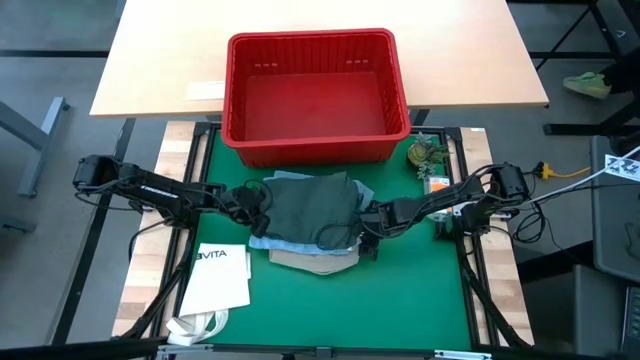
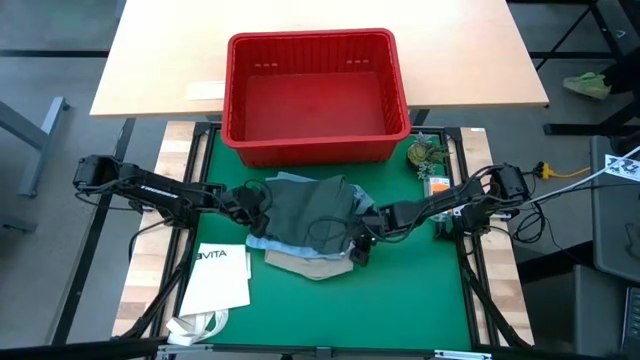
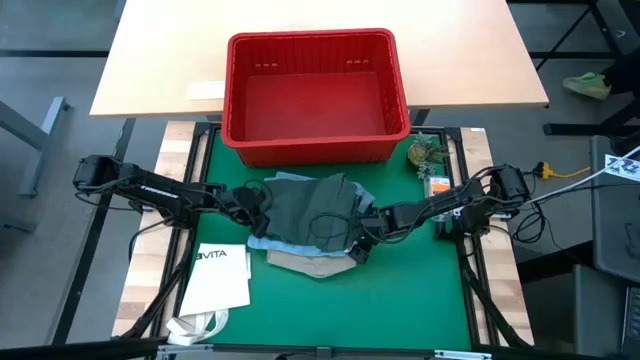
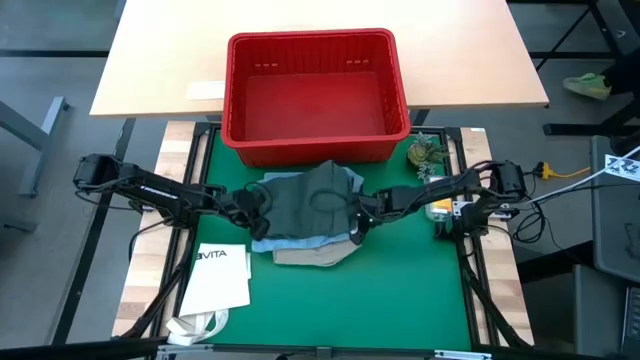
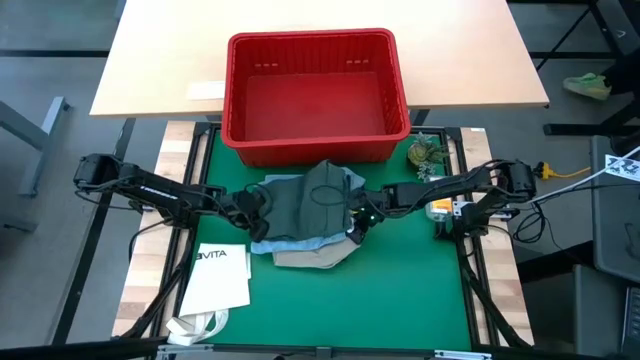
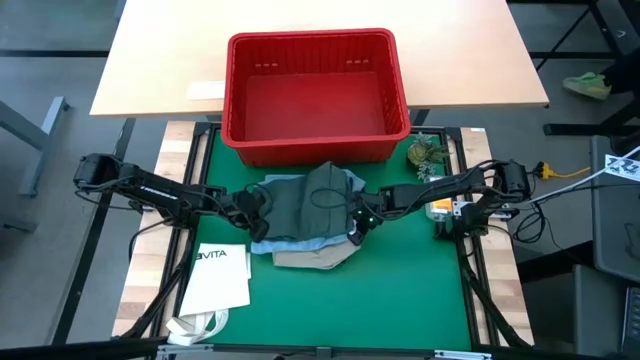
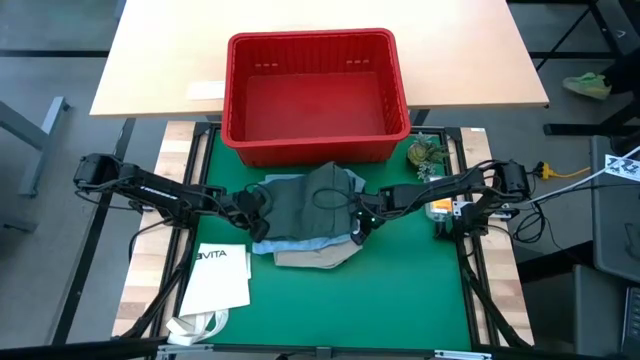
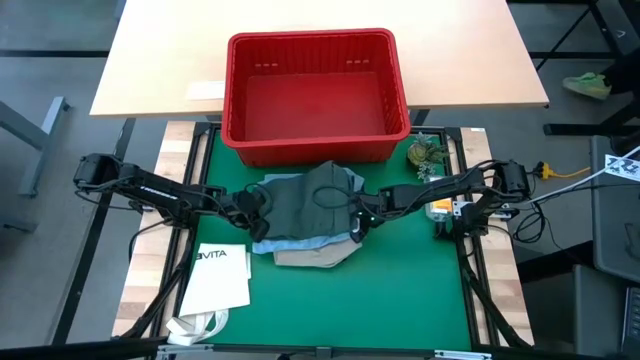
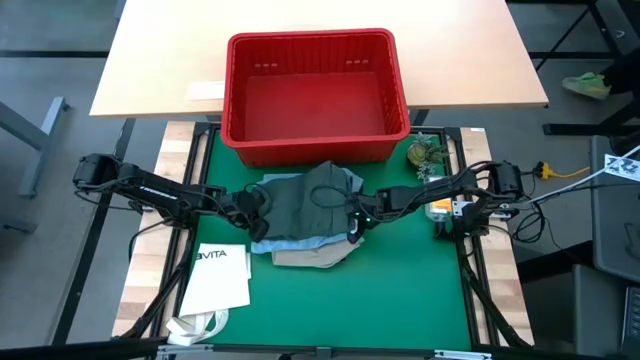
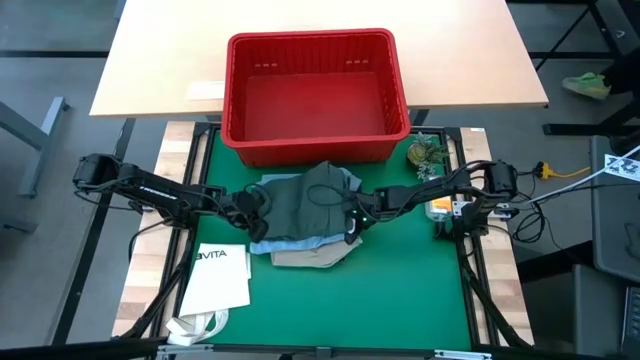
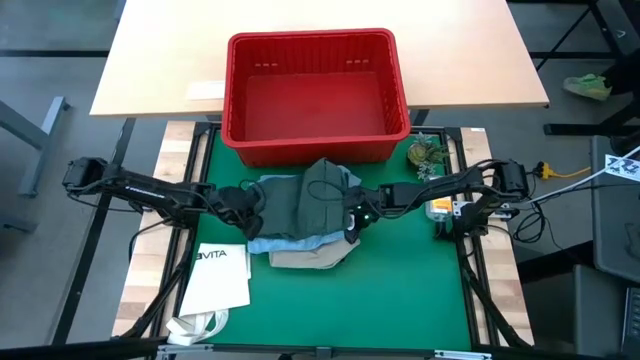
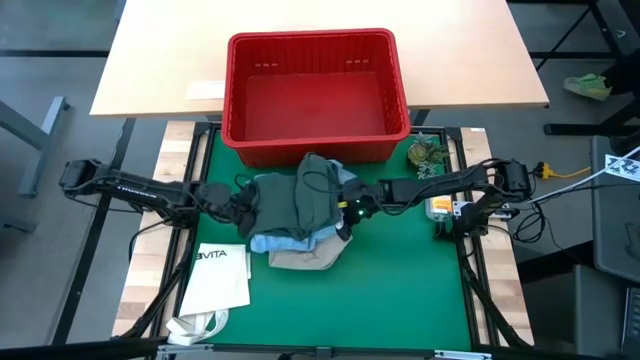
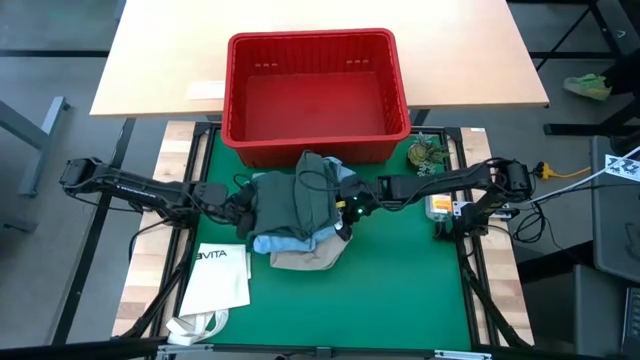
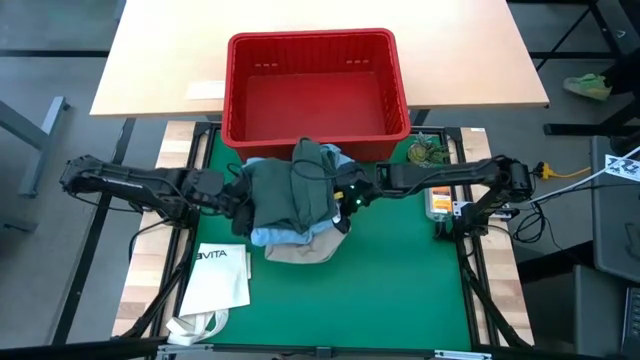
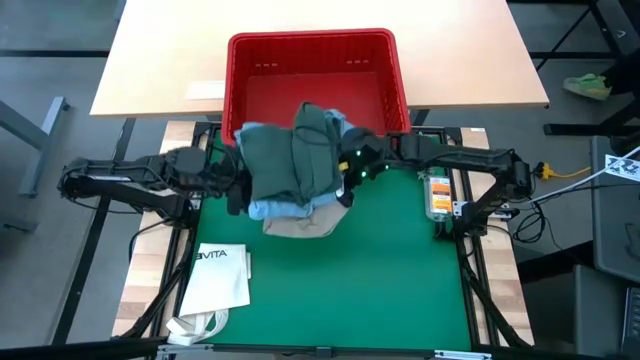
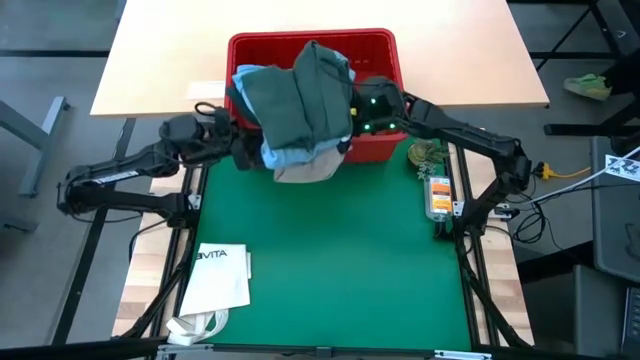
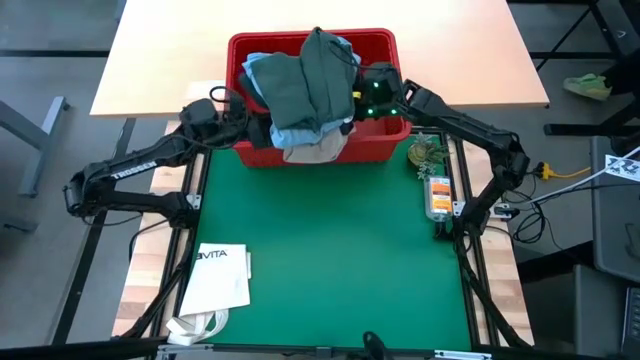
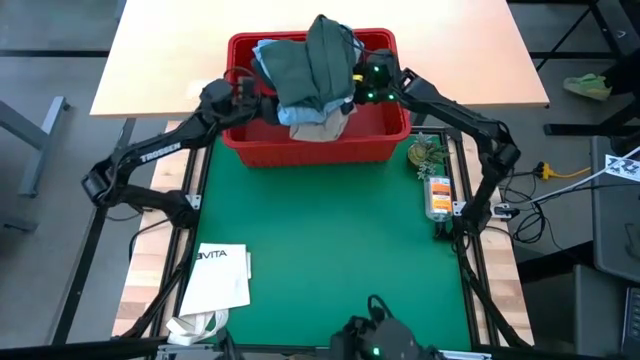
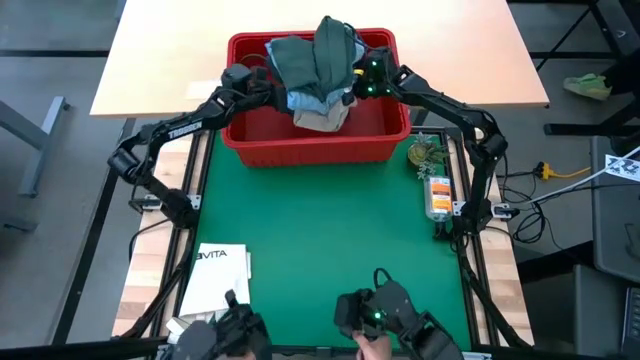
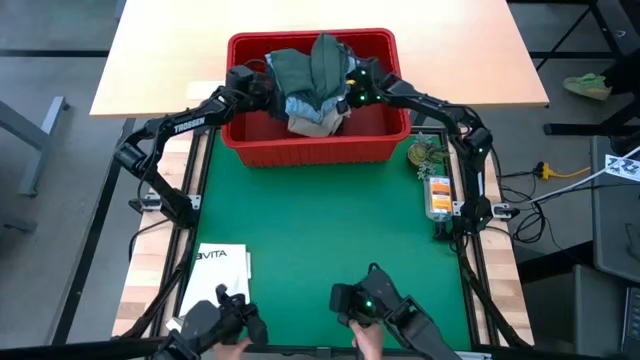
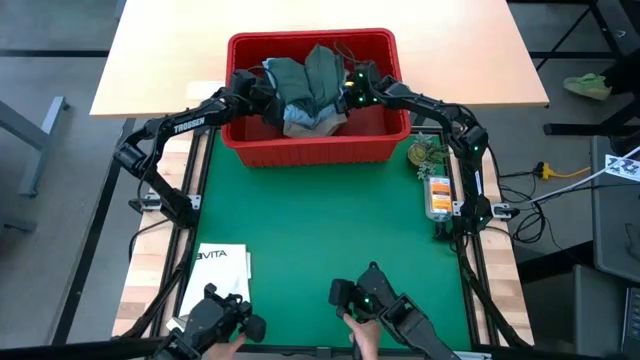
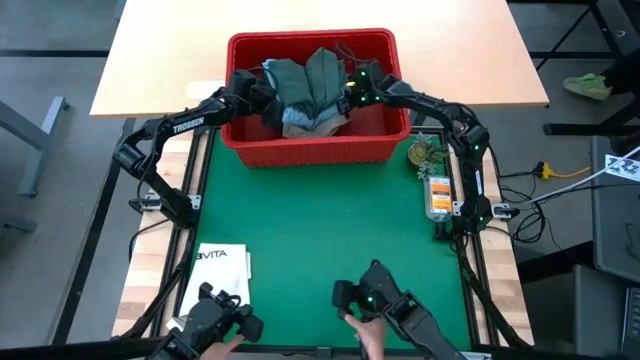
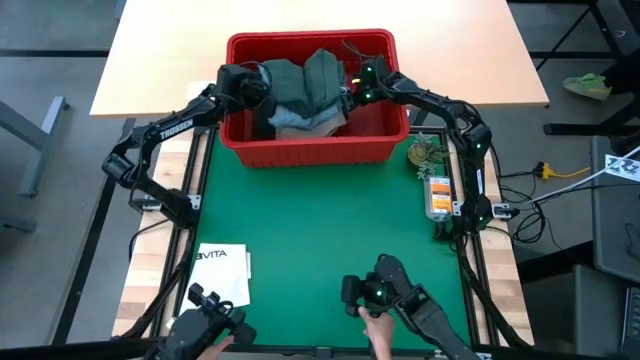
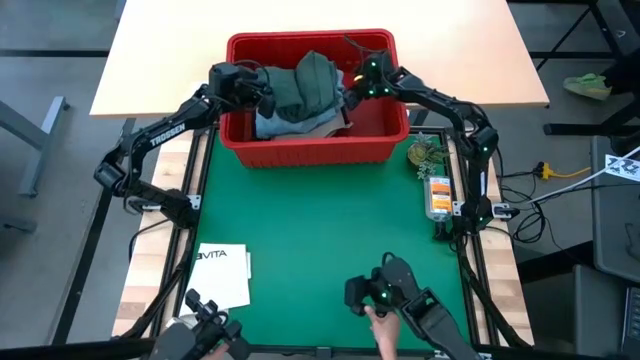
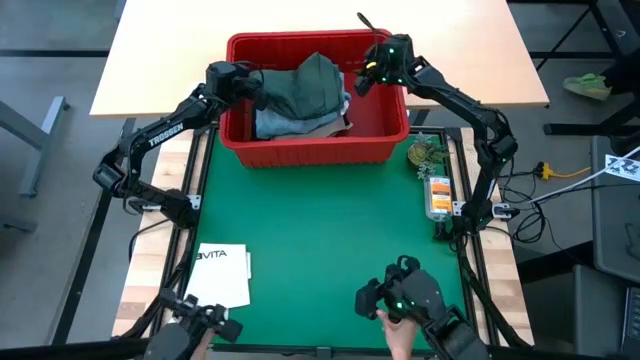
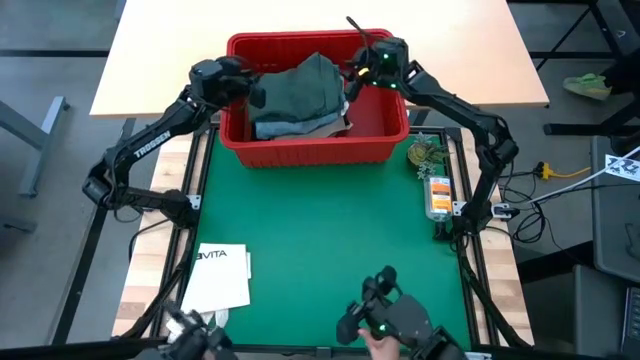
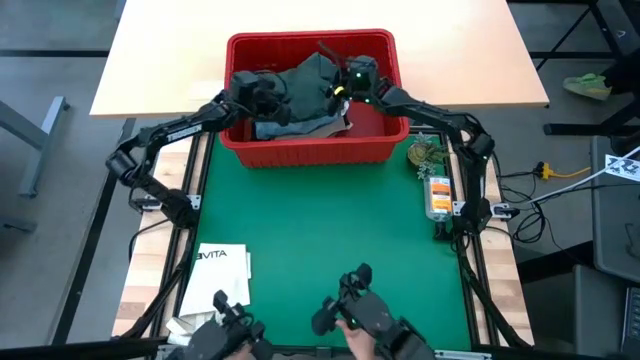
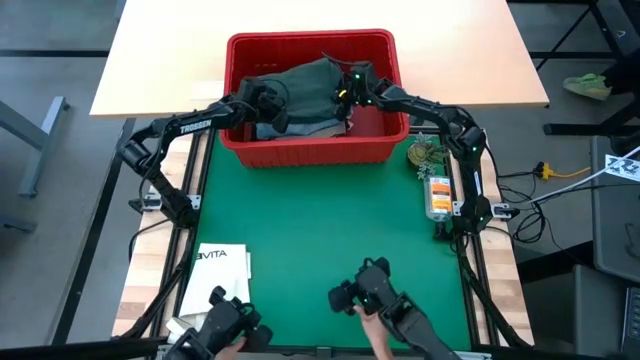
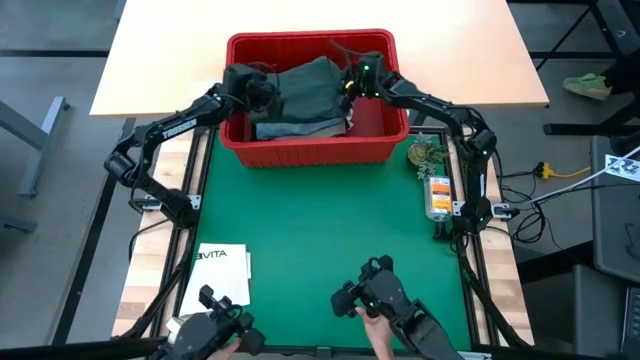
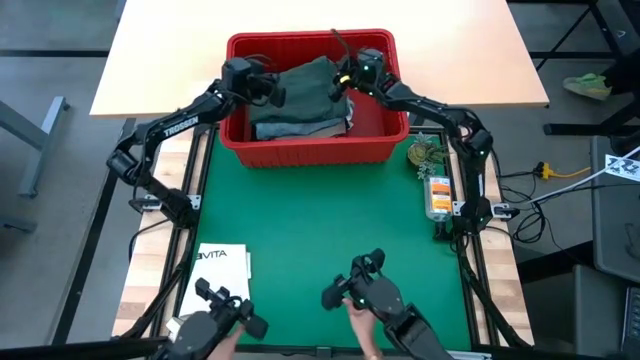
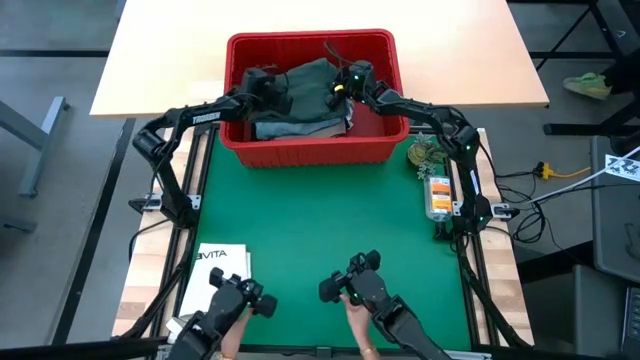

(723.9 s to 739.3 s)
Task: Fold Laundry from Bin
Put the stack of folded clothes into the red bin

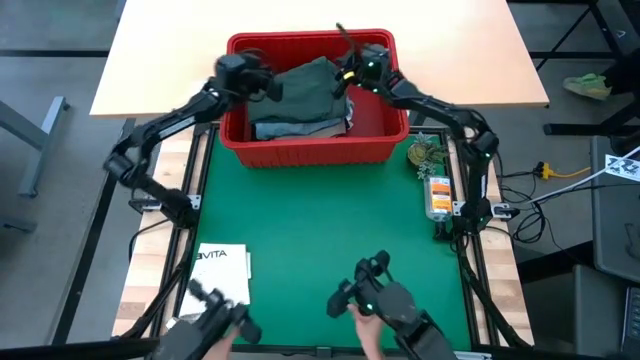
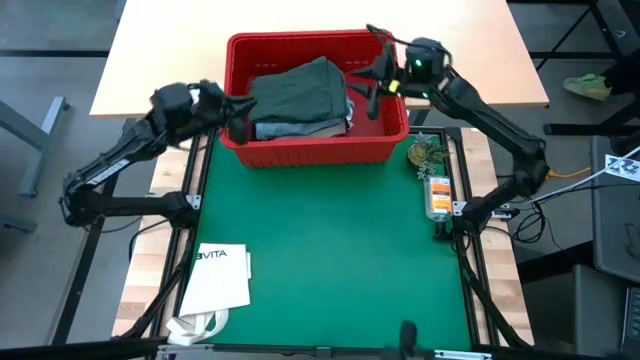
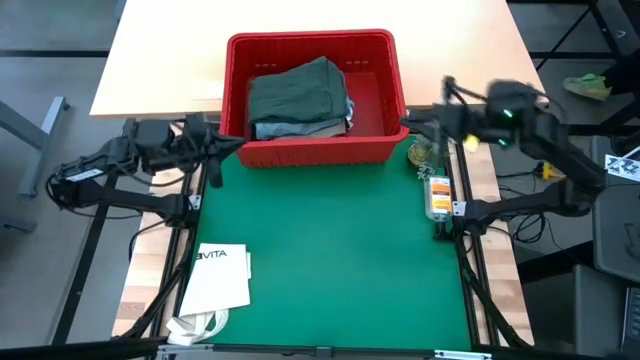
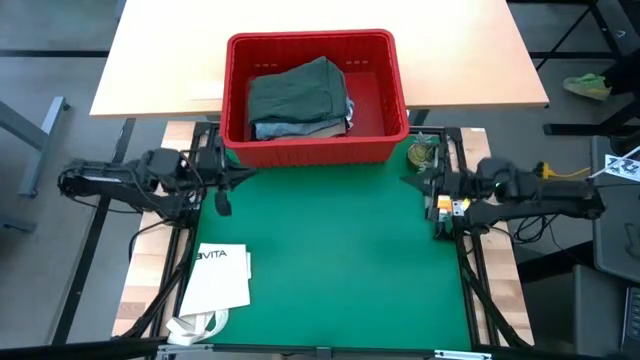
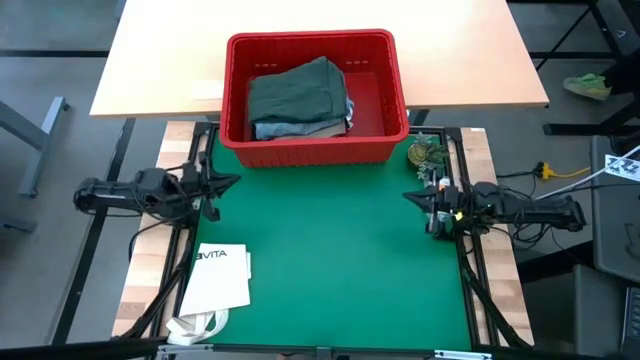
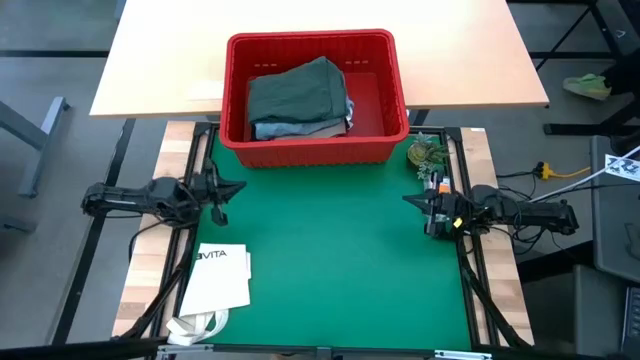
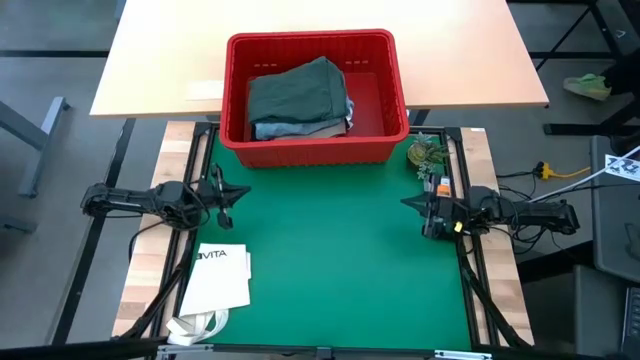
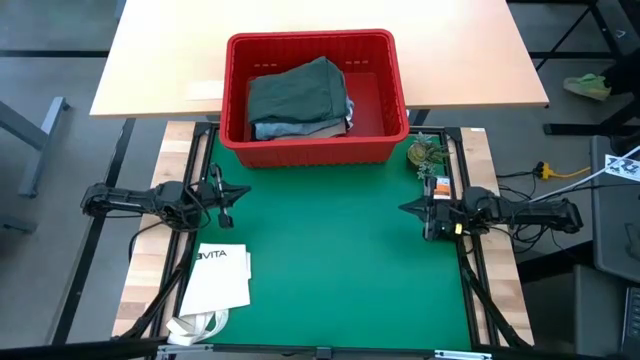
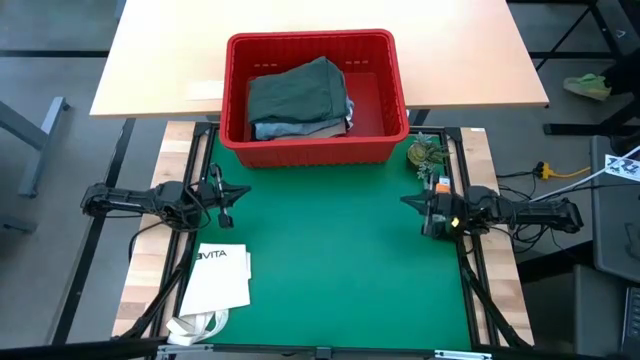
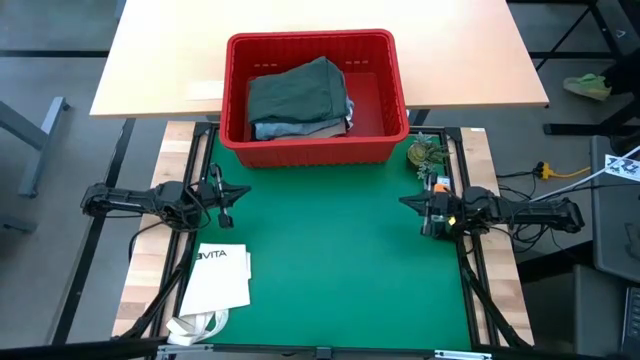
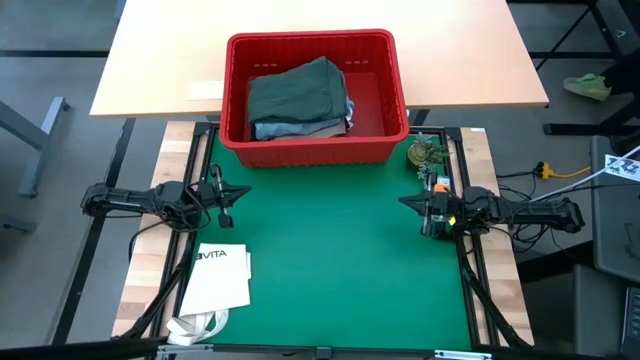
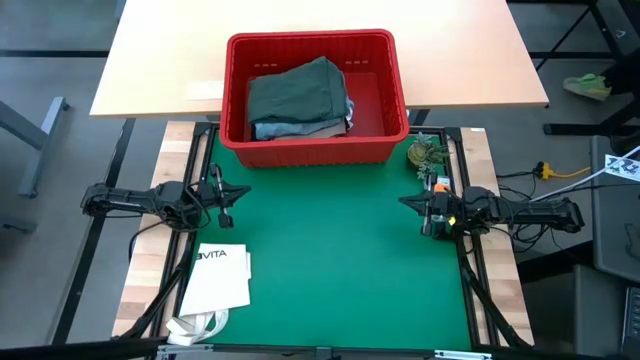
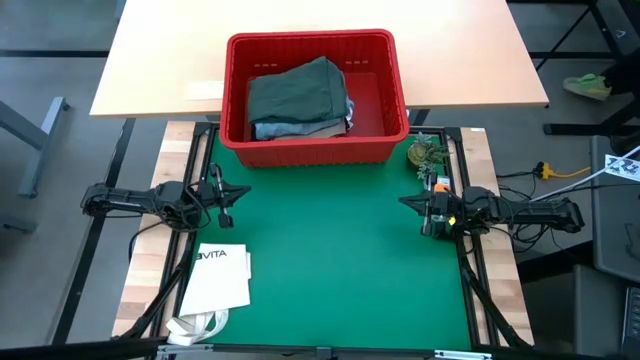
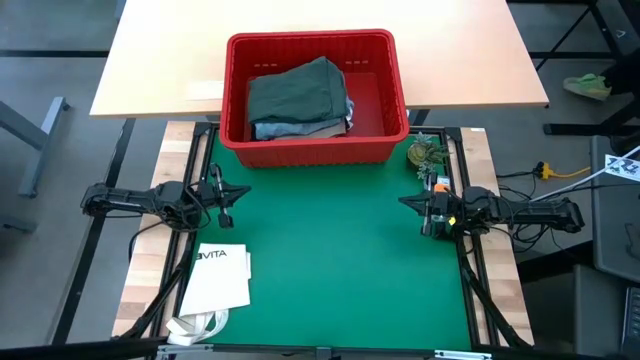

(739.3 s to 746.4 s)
Return to Home Position
